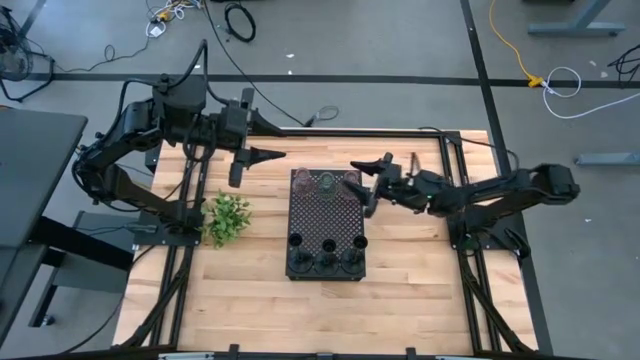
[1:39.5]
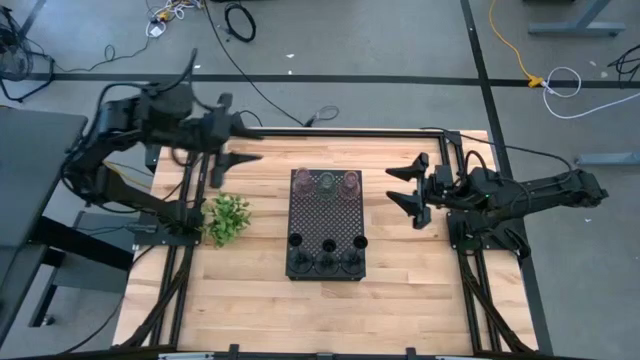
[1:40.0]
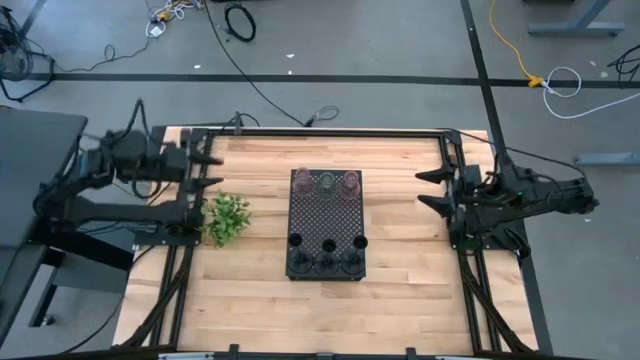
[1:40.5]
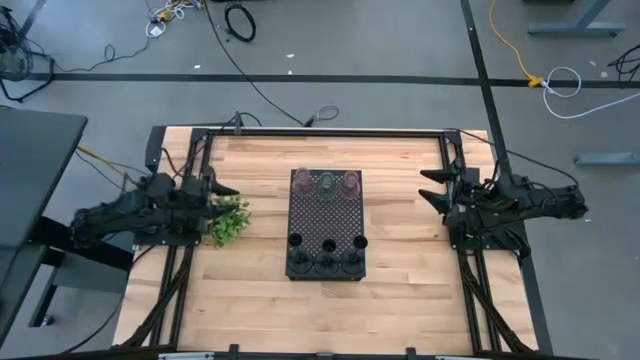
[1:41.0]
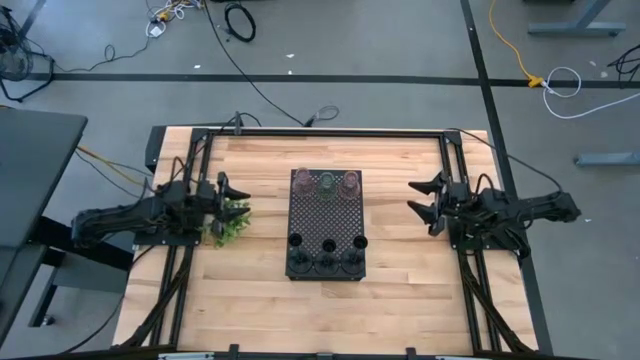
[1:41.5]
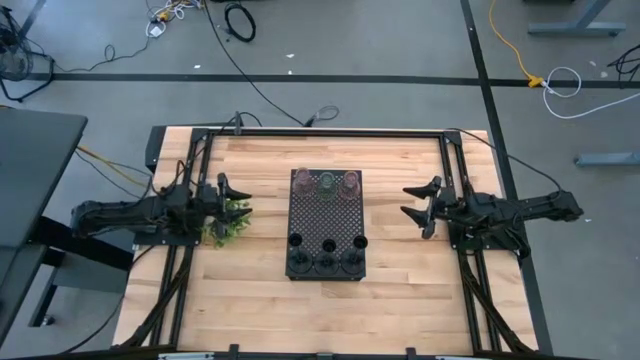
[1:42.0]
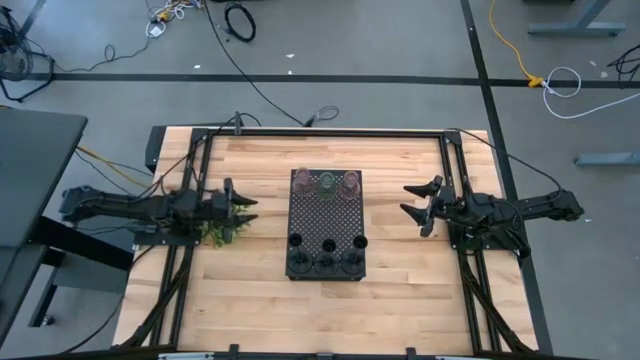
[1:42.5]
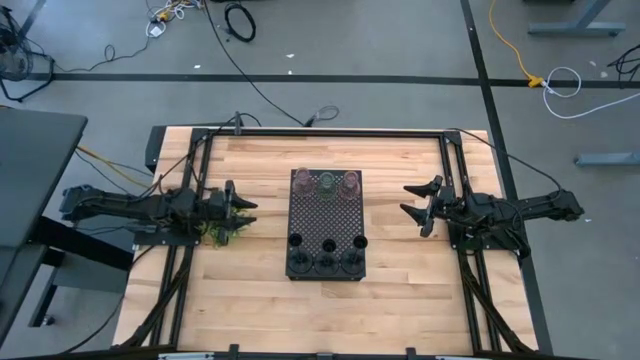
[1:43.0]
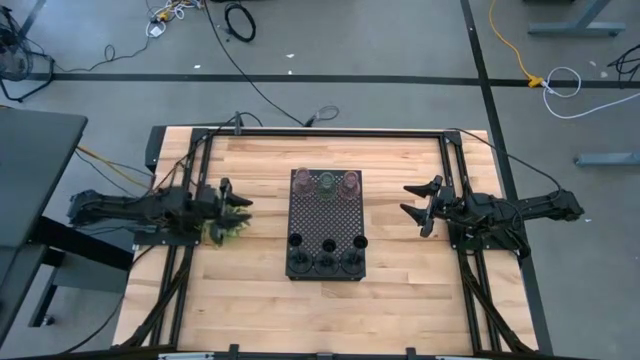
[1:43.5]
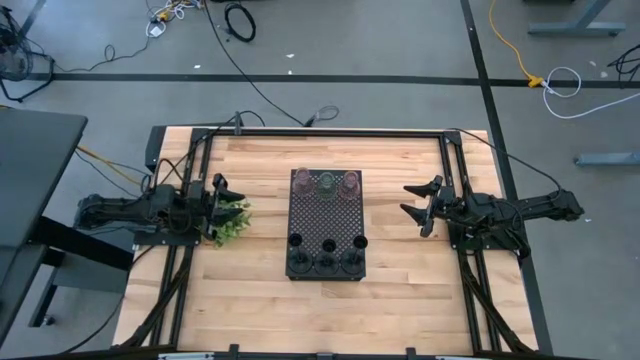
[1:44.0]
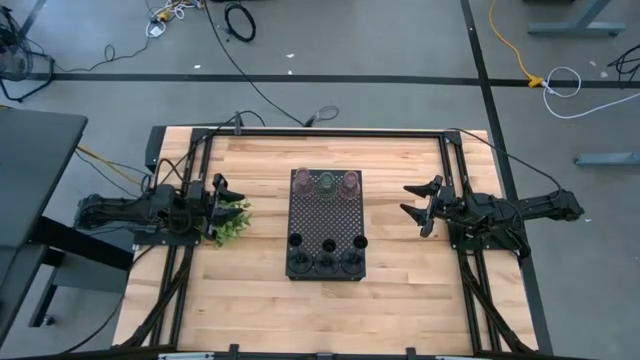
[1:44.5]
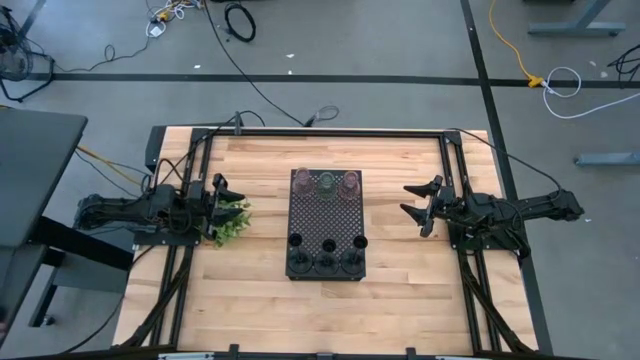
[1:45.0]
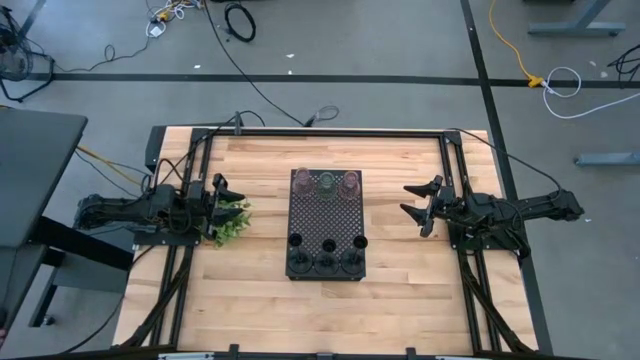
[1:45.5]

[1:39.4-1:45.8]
Task: Pick & Place candle stick holders
Return to Home Position

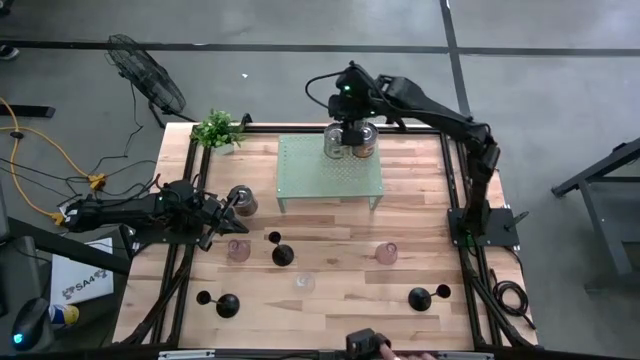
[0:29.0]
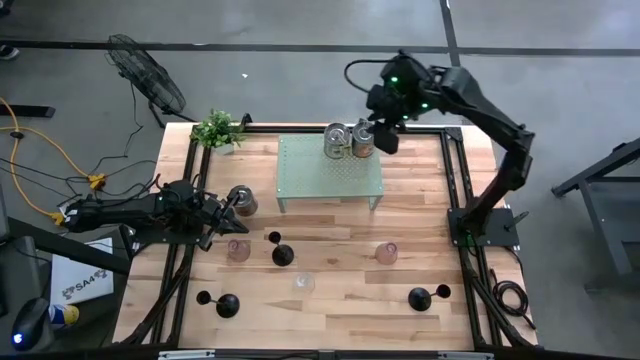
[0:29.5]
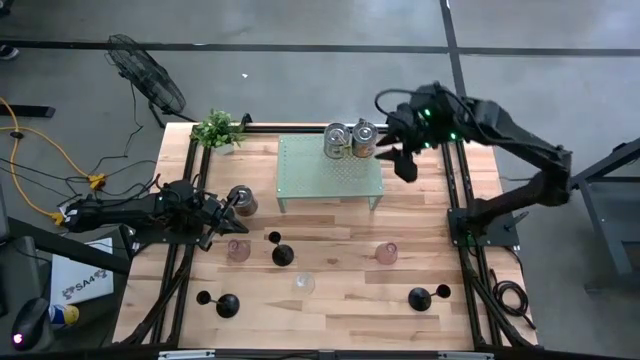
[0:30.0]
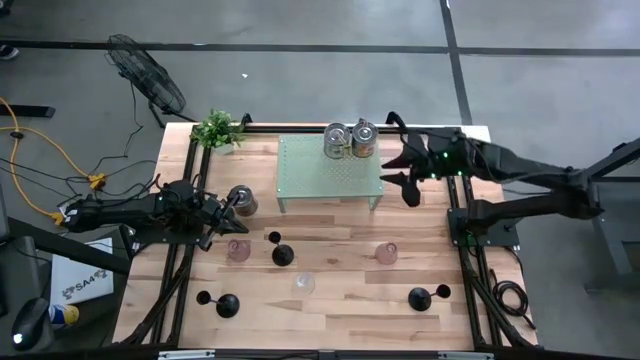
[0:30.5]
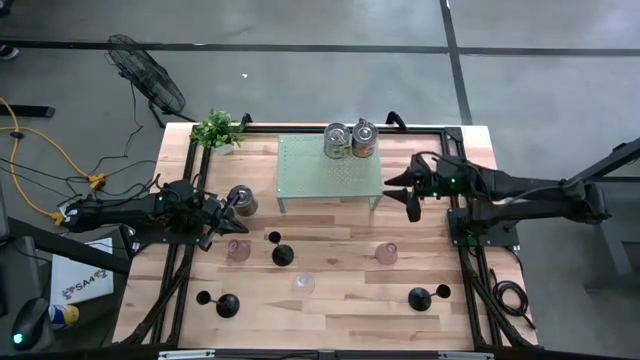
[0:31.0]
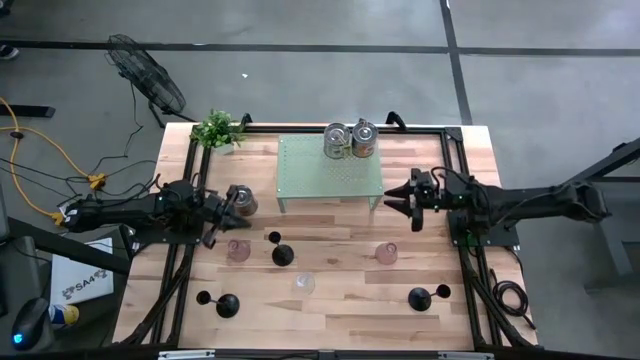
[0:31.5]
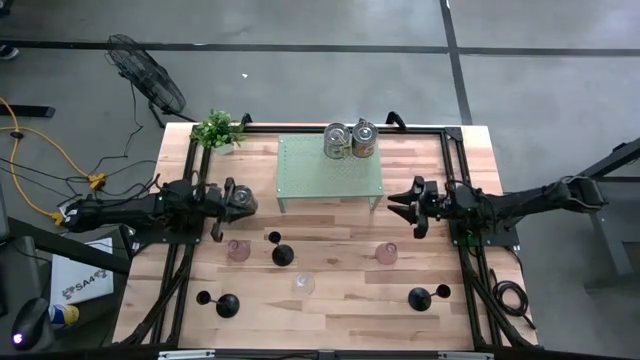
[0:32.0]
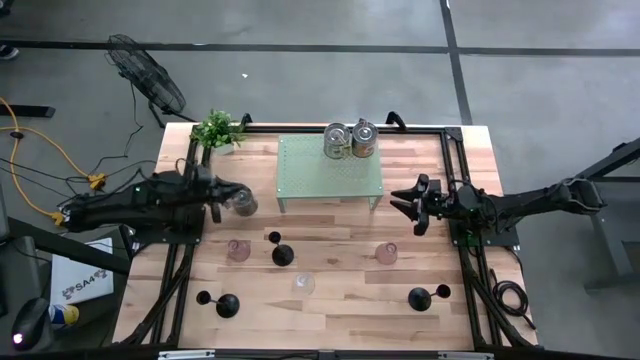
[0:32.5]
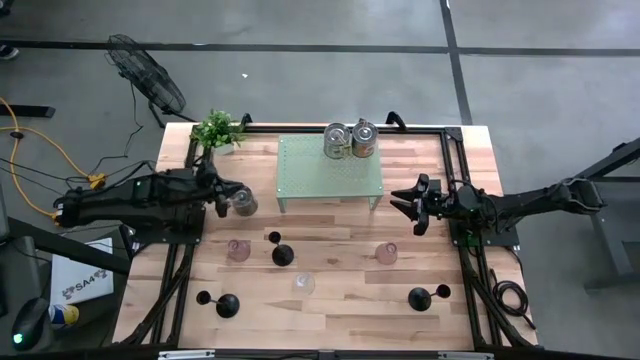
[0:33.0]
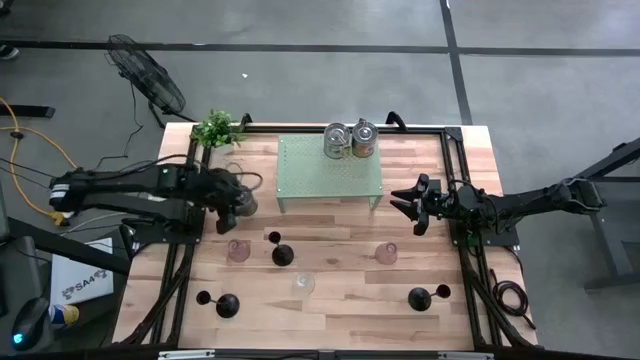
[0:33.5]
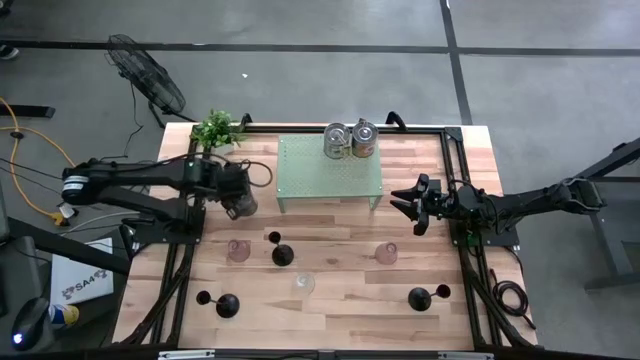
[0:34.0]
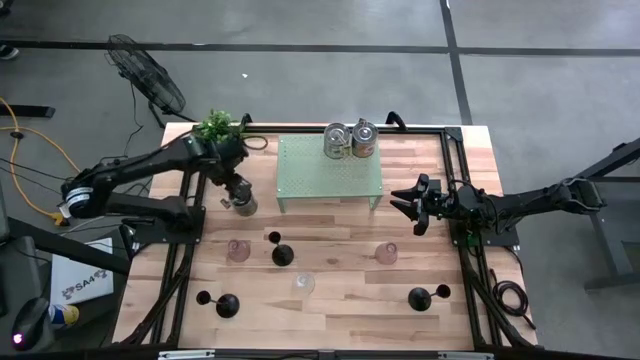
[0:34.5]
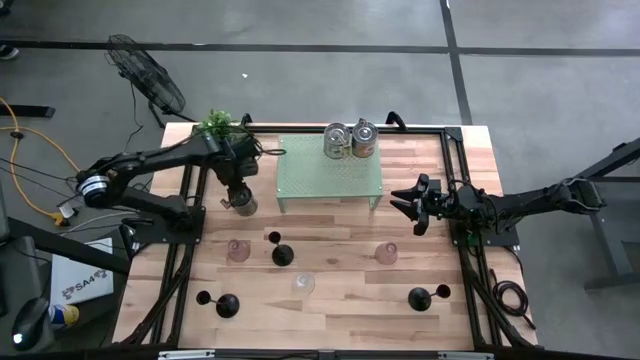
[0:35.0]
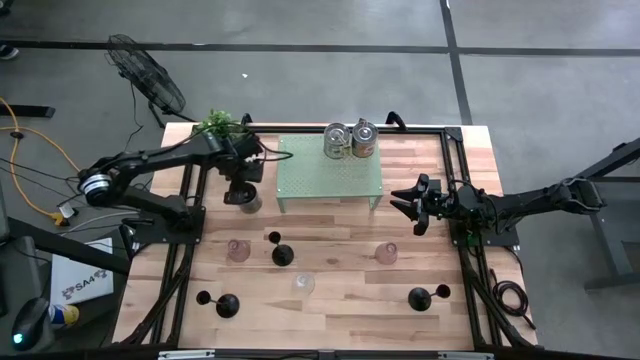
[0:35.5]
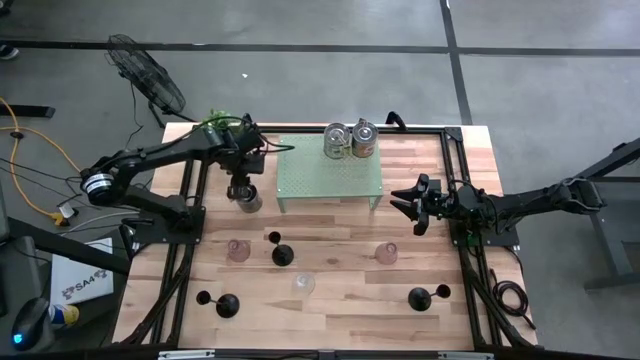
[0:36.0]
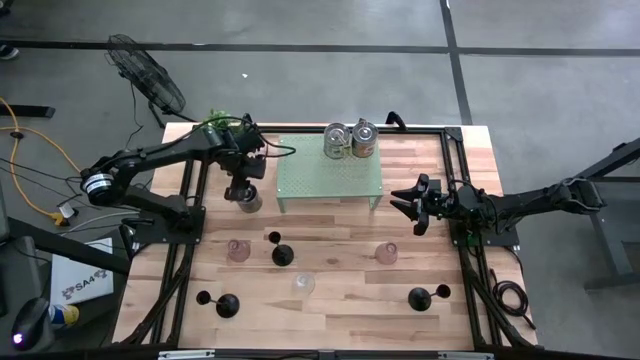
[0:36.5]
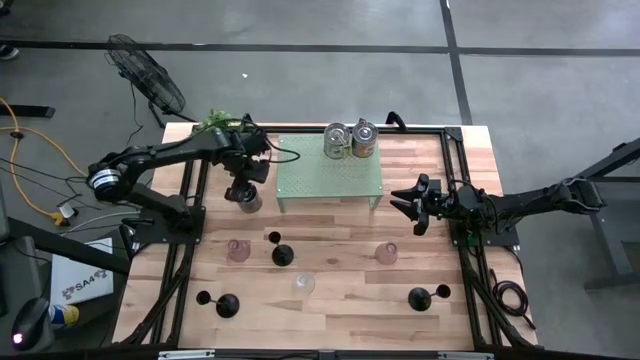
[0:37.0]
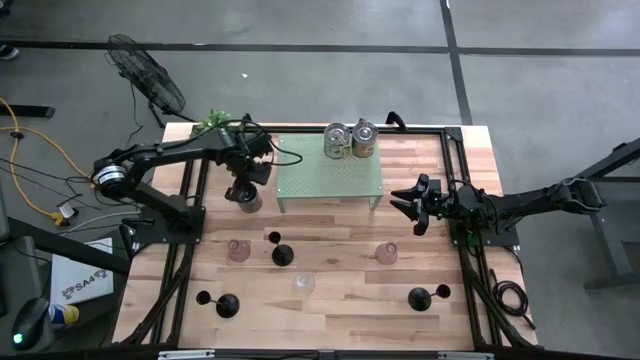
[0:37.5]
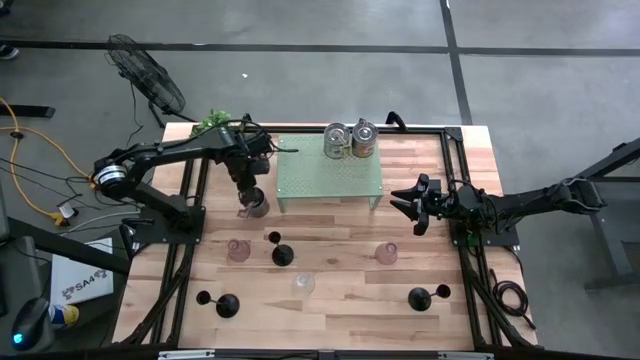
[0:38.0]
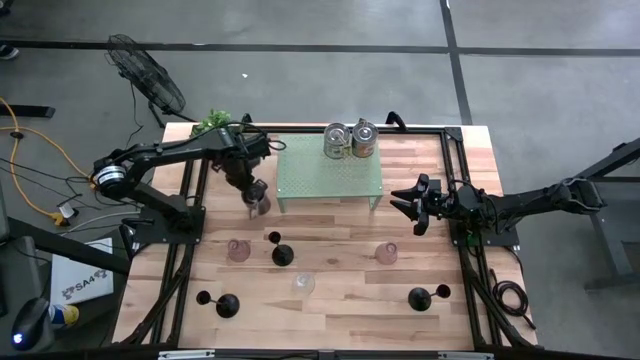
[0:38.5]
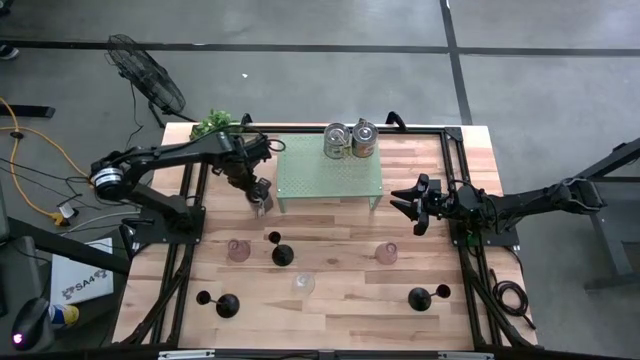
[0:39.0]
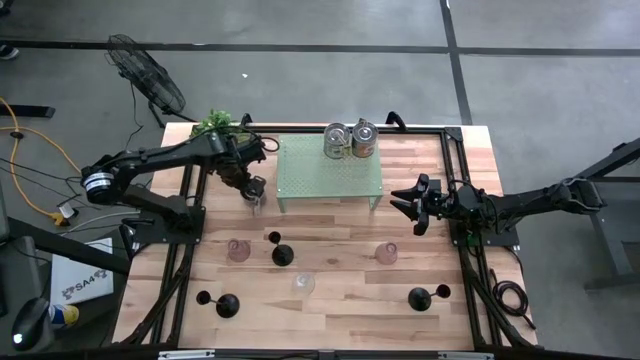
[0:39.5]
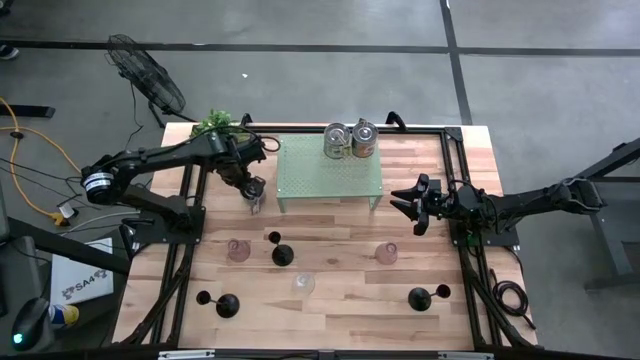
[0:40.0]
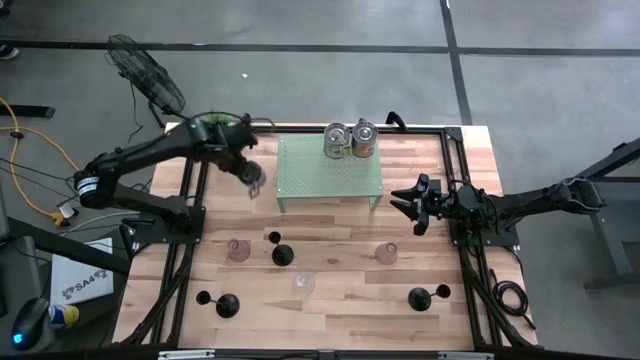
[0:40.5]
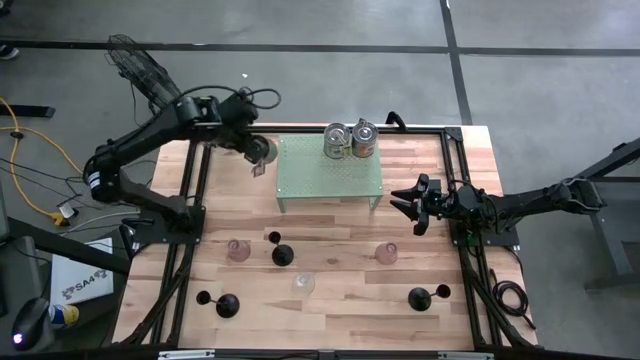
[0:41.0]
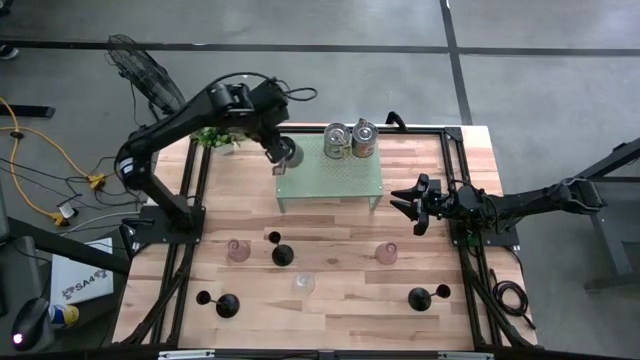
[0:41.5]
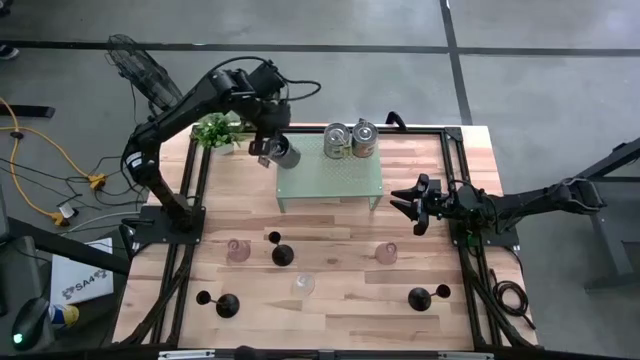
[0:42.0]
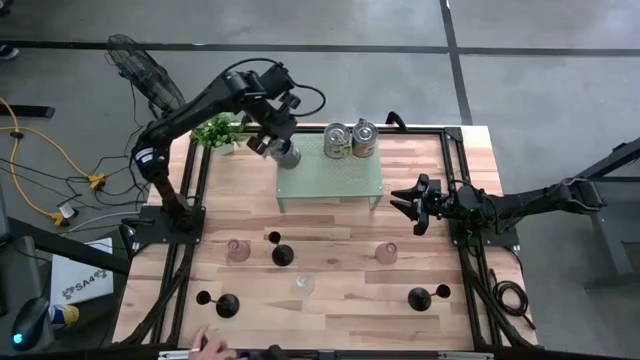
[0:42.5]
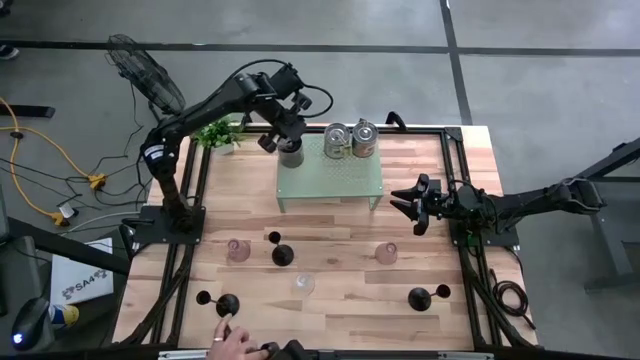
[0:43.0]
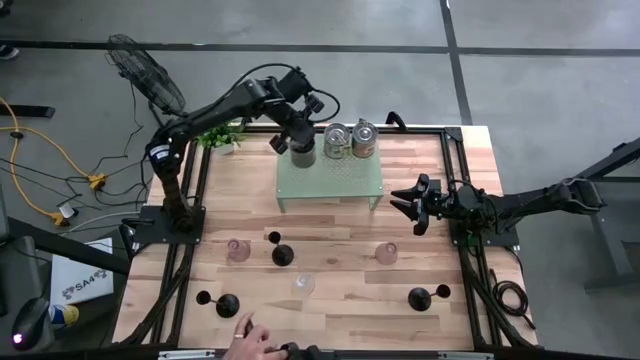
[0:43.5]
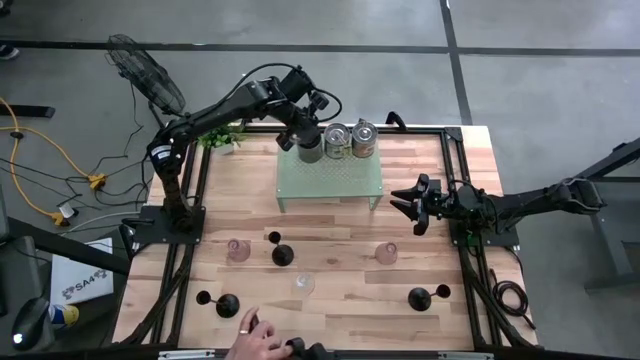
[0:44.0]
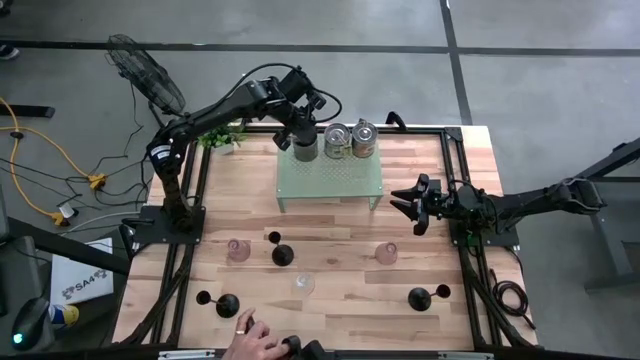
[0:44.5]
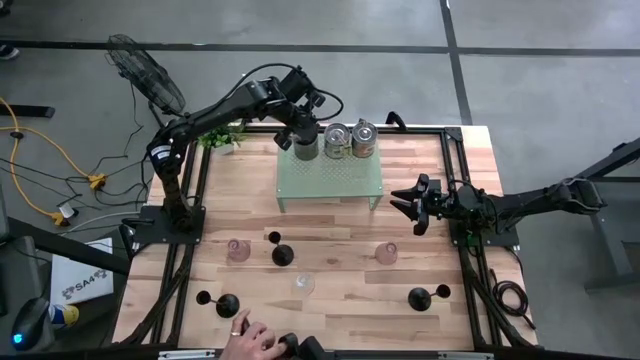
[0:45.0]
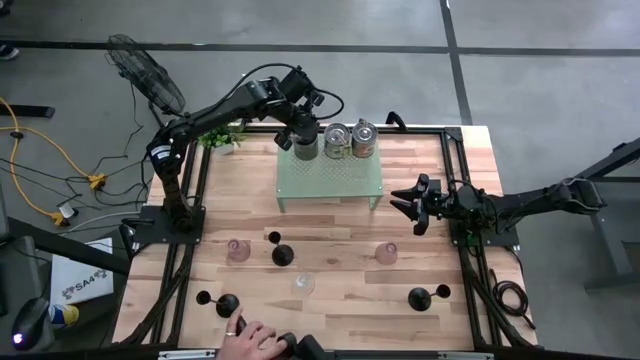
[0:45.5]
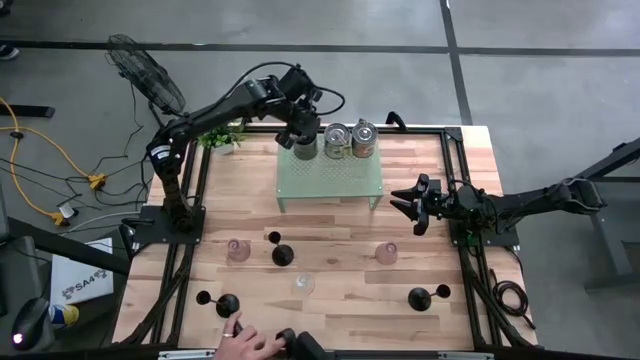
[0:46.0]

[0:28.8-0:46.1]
Task: Pick & Place candle stick holders
Put the silver scented candle on the shelf aligned with the other silver scented candles
